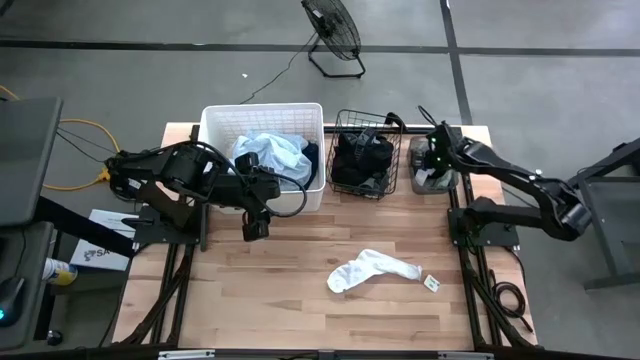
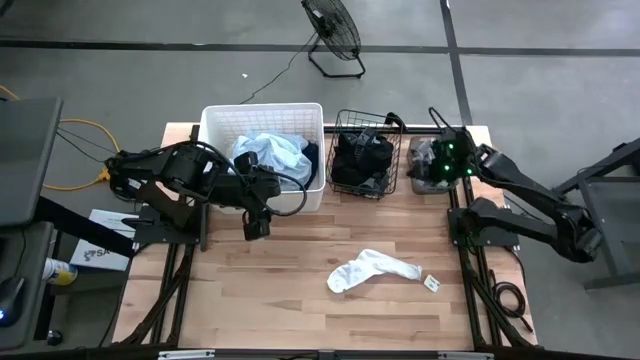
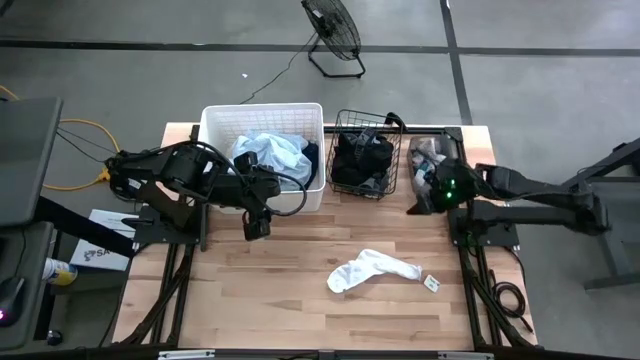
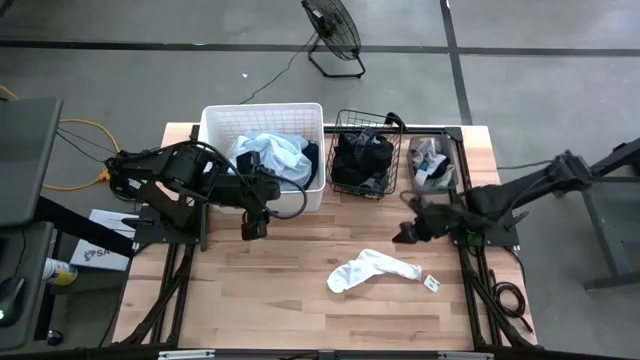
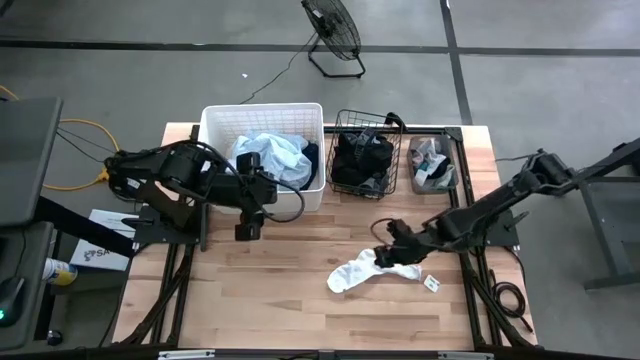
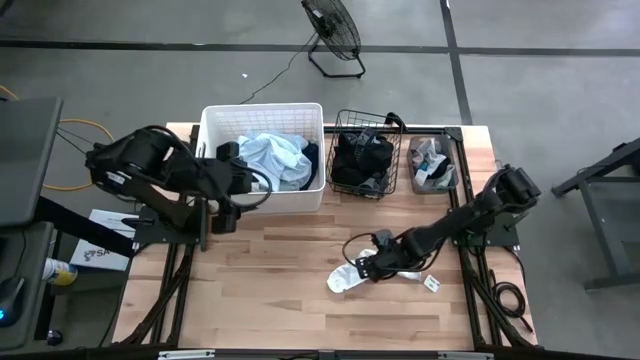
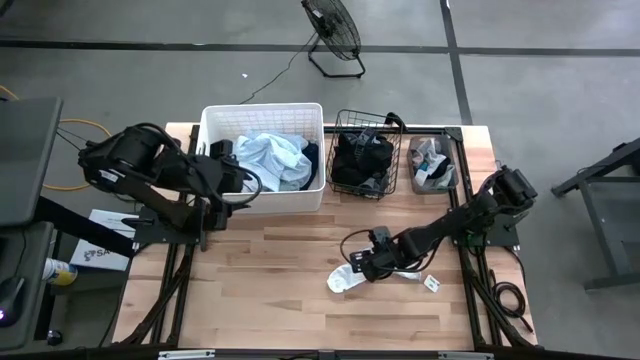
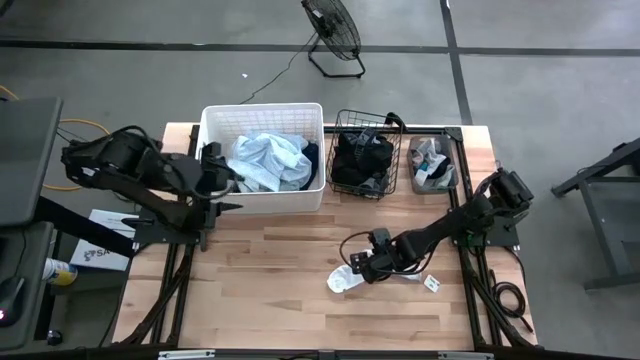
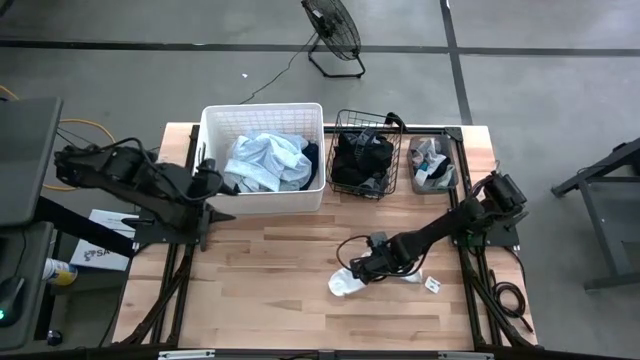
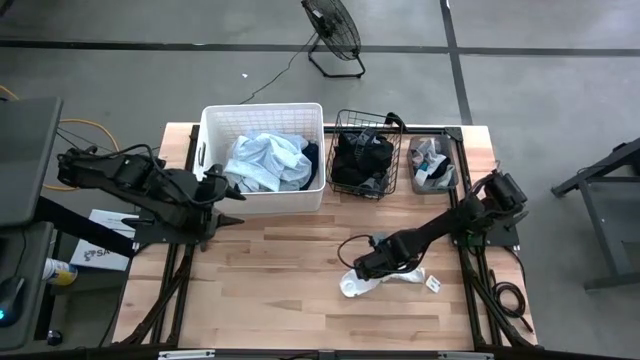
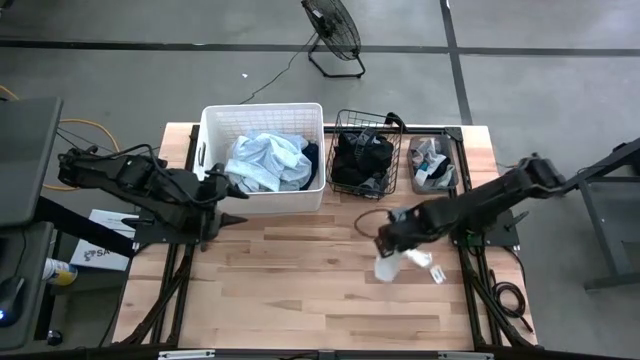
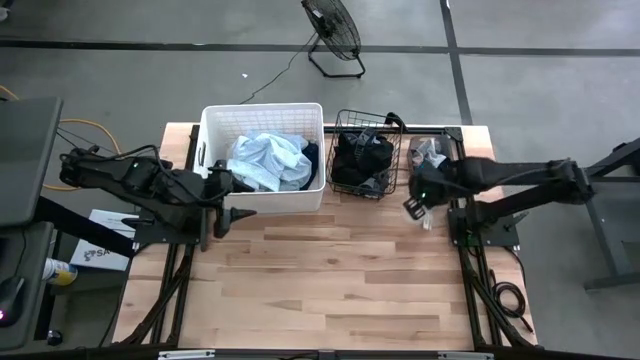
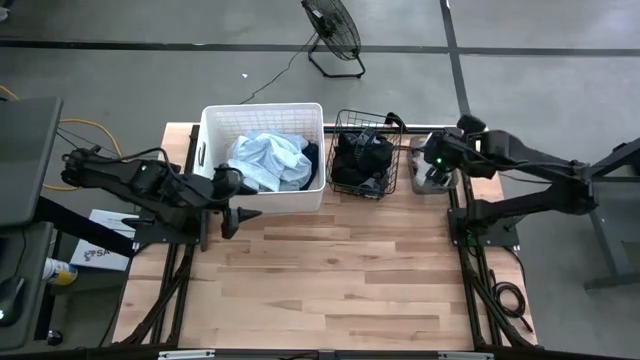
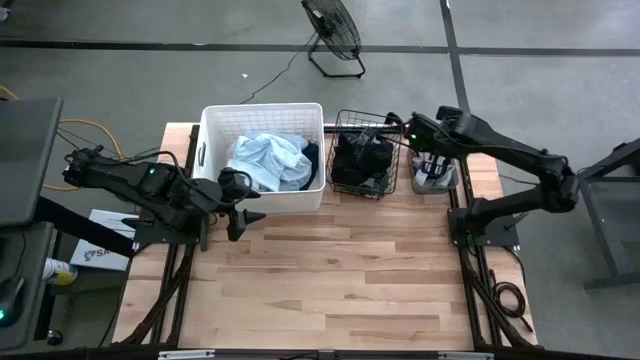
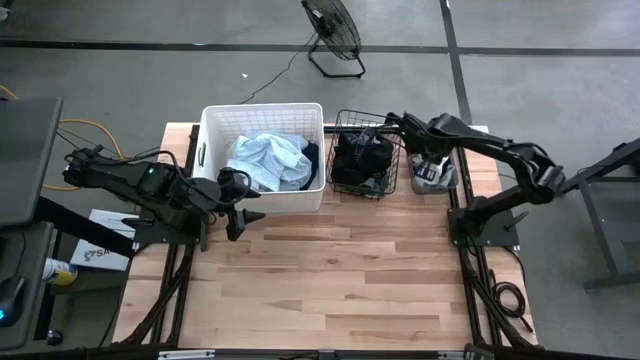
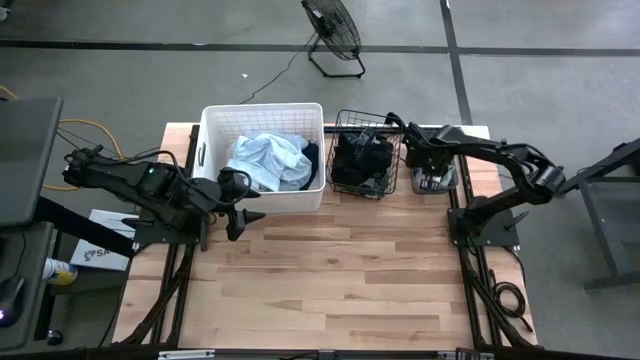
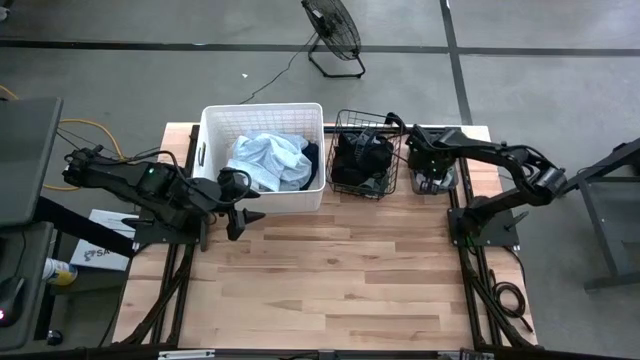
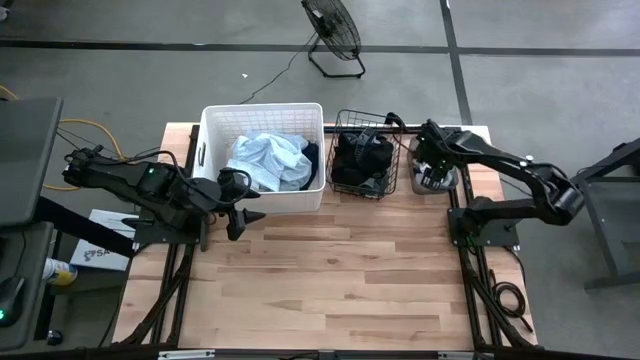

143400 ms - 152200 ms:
Task: Pick & Place Cloths
Put the white sock into the black bin

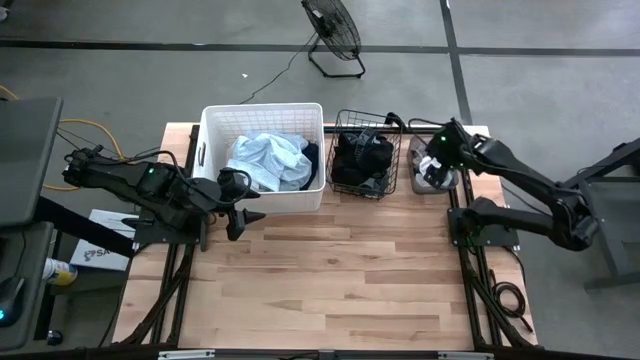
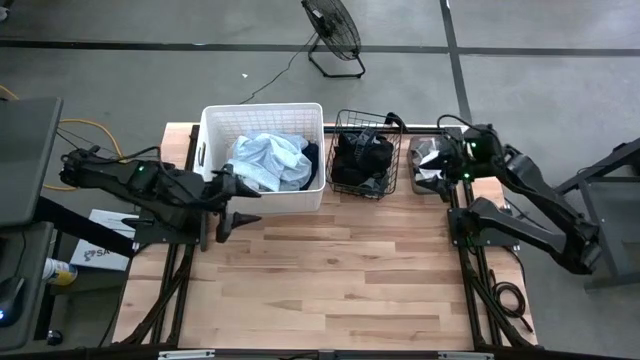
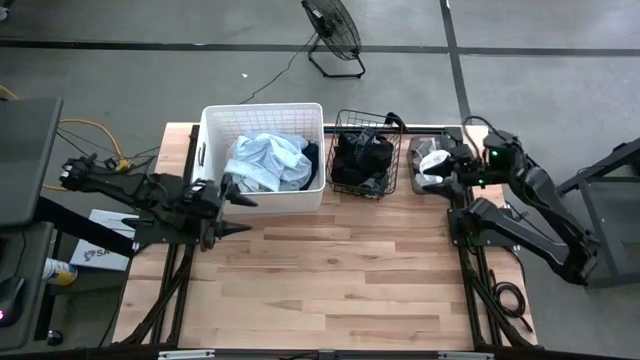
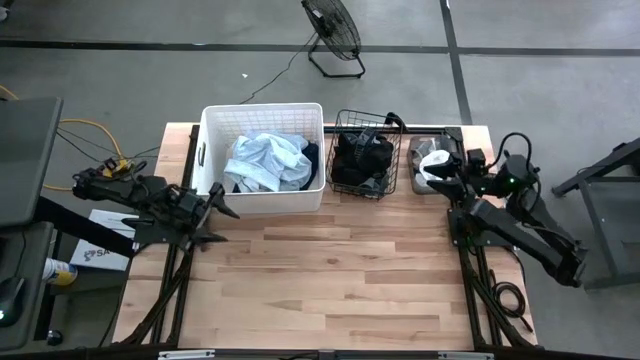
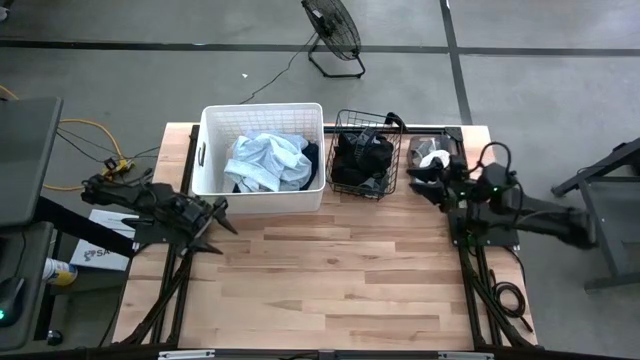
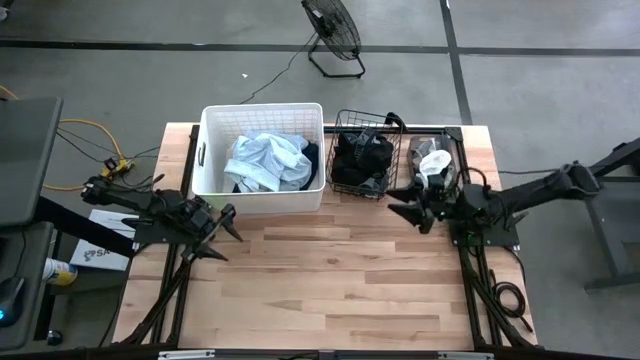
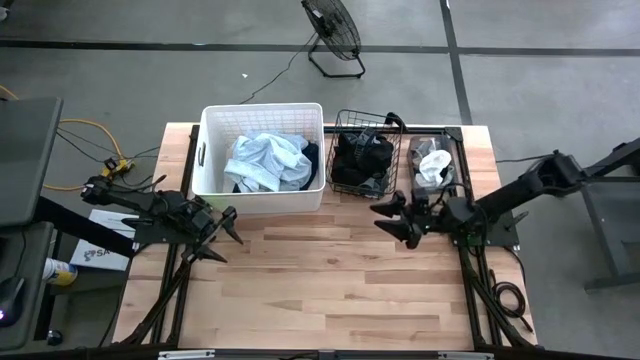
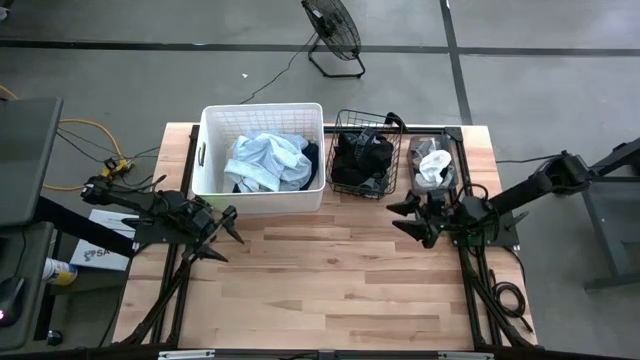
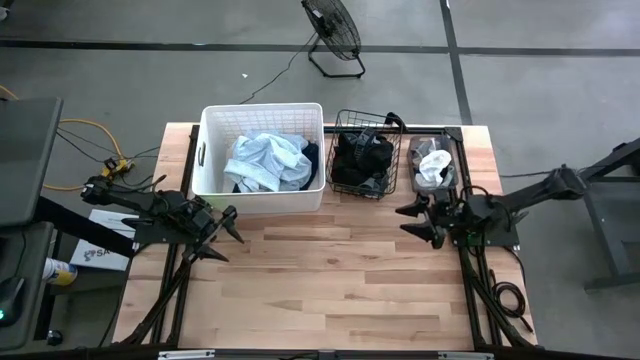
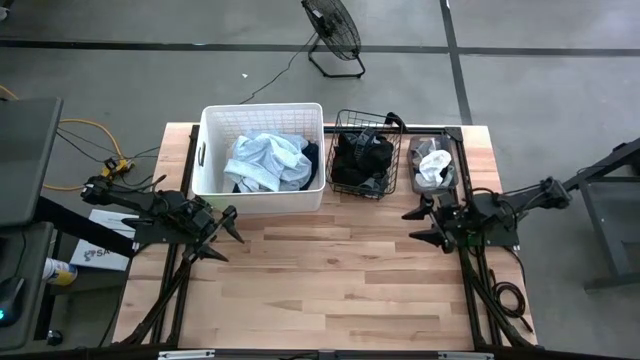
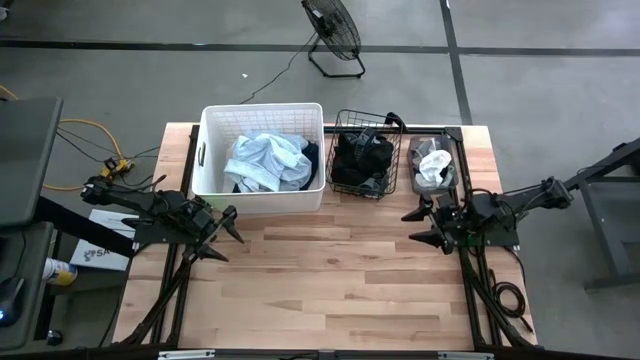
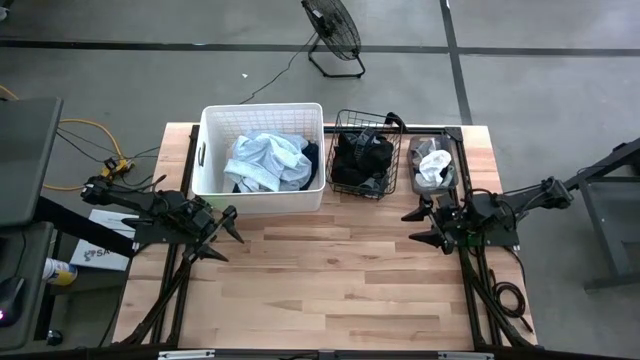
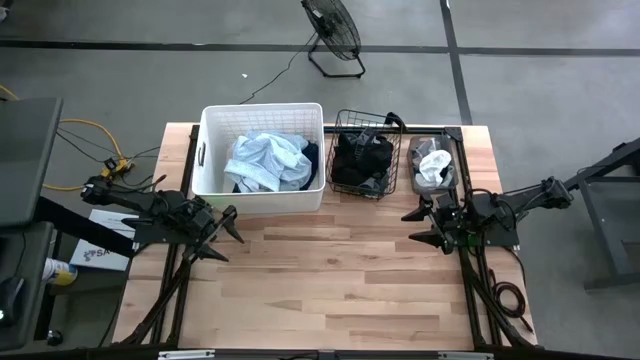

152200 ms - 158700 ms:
Return to Home Position

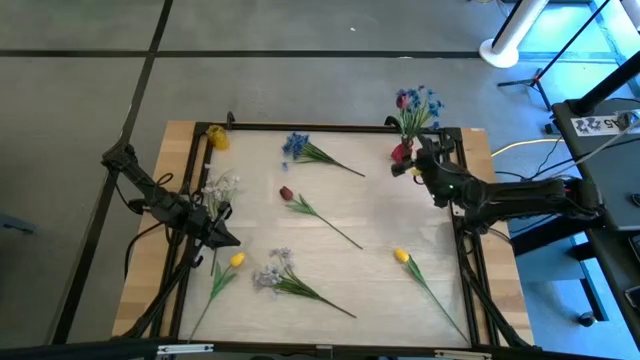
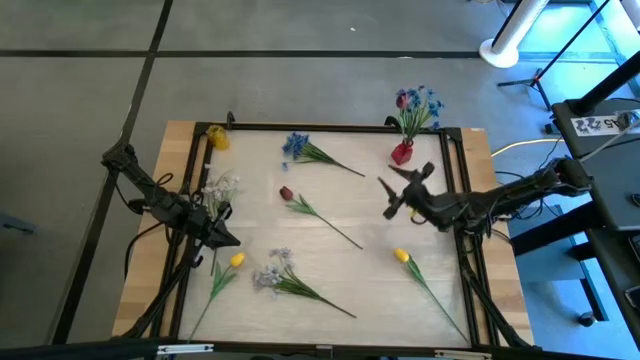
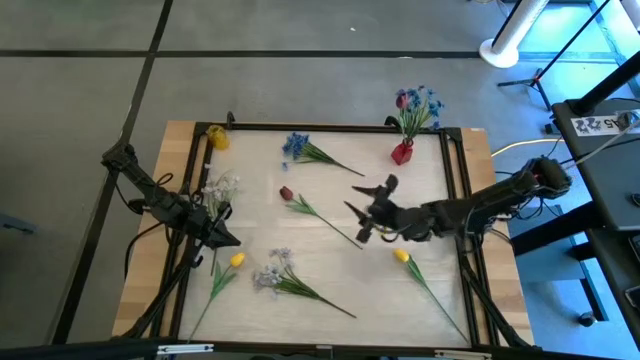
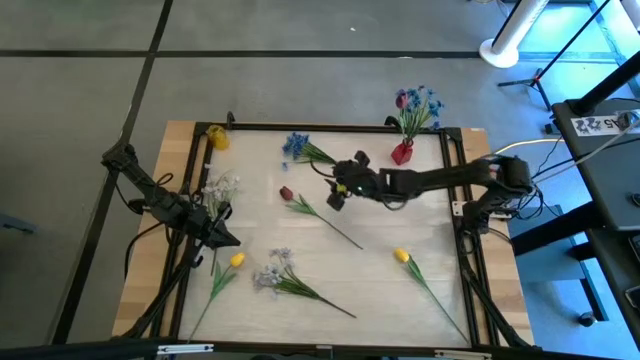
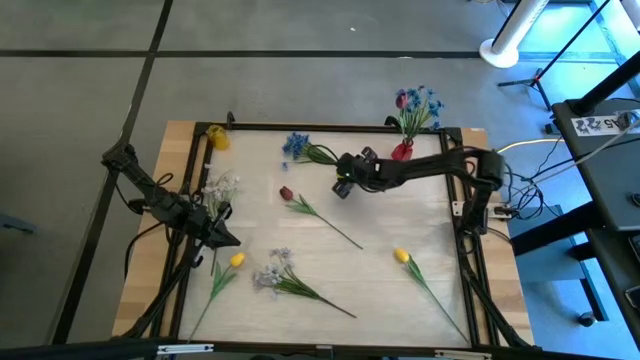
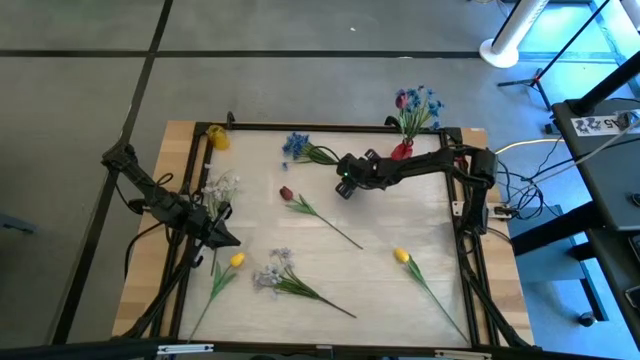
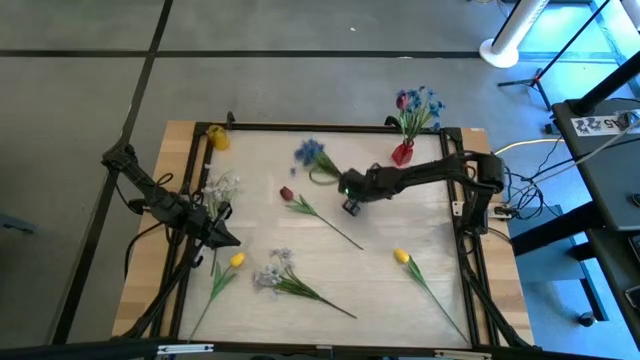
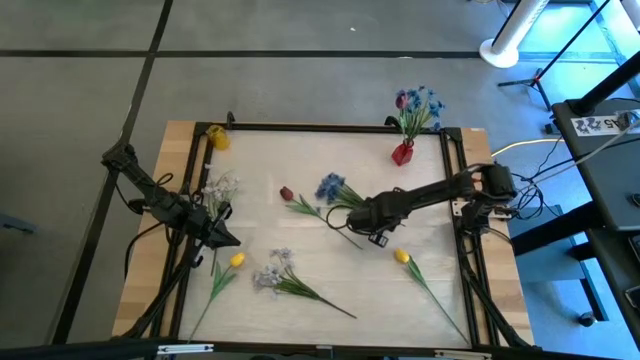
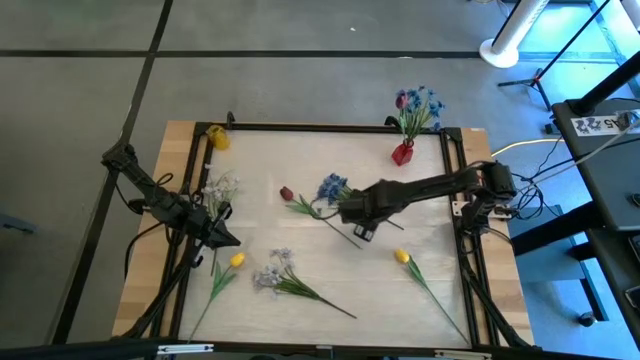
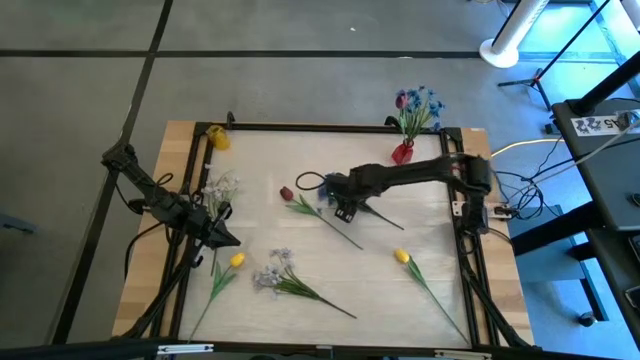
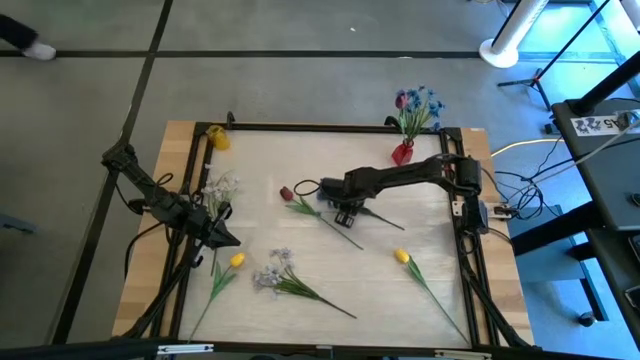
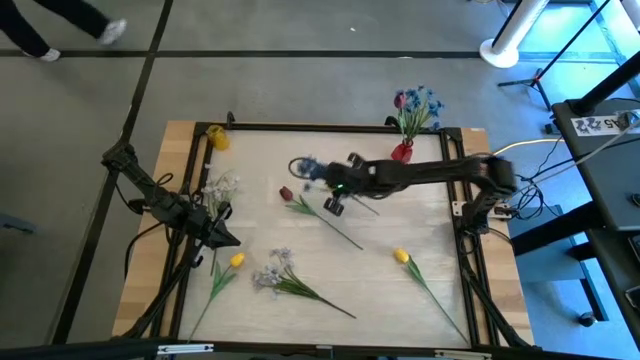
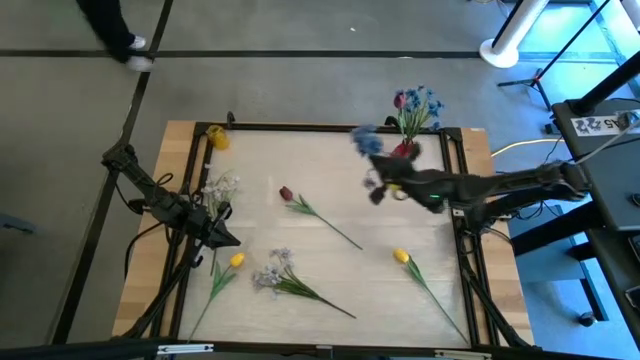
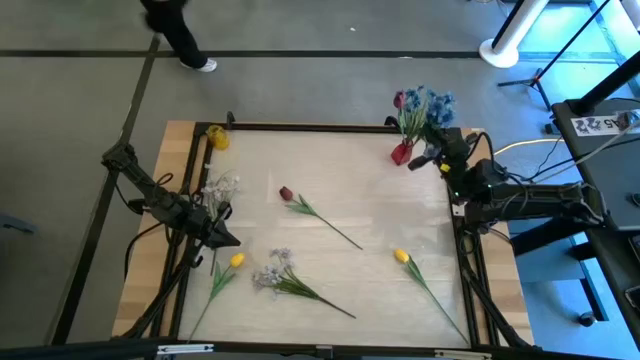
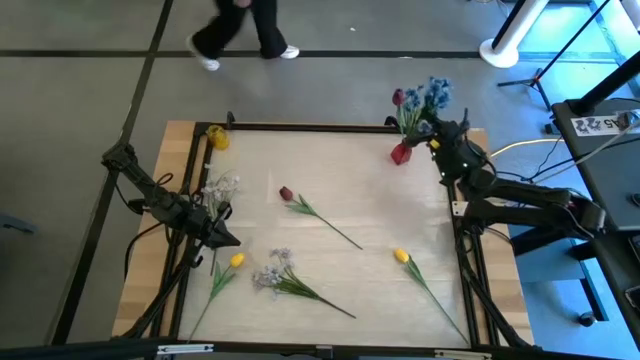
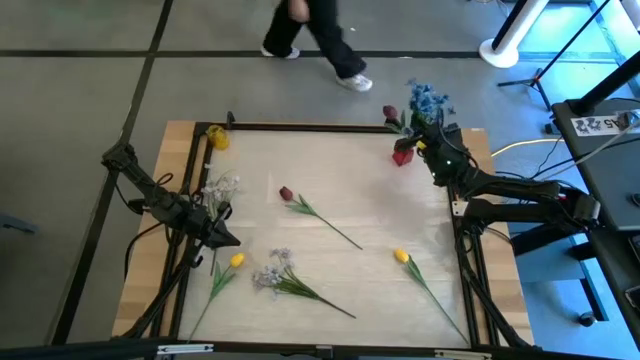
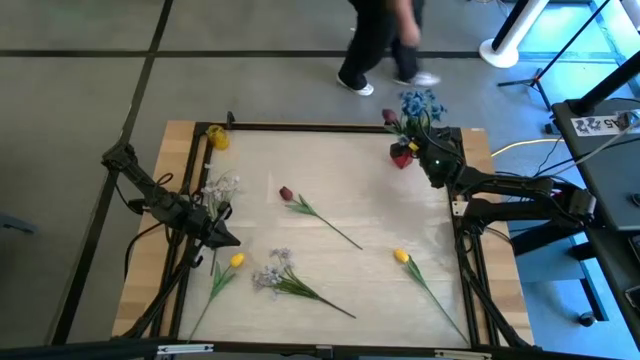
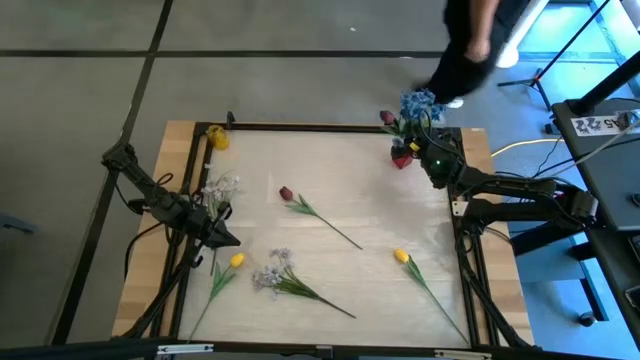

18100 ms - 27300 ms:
Task: Sort flowers into vase by color
Put the blue flower into the red vase
